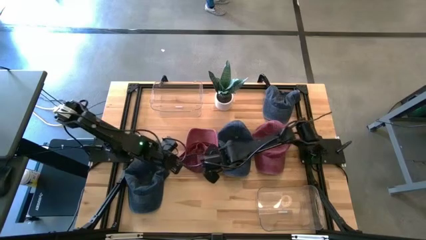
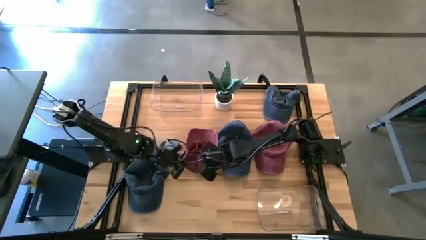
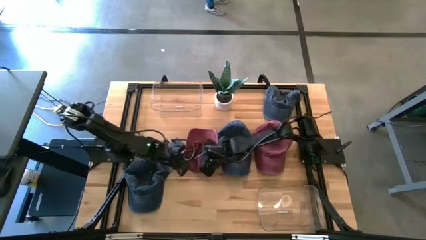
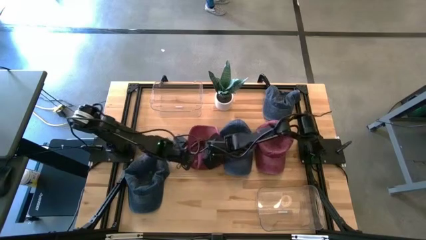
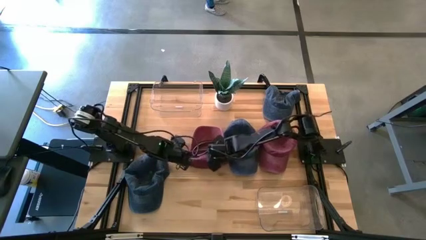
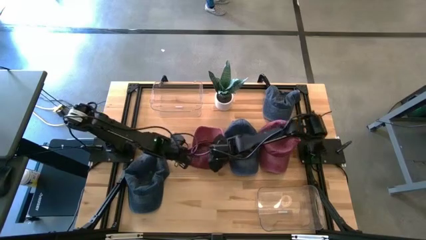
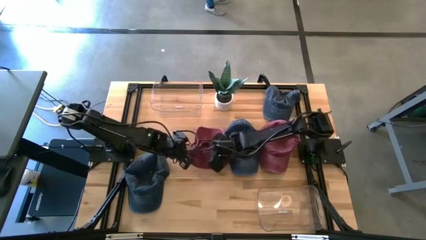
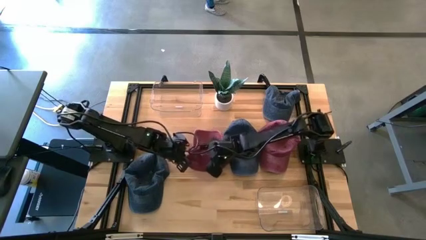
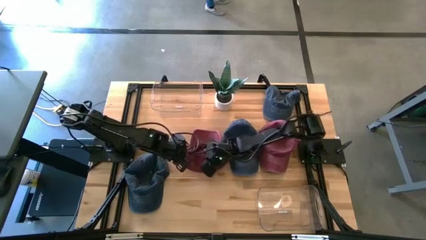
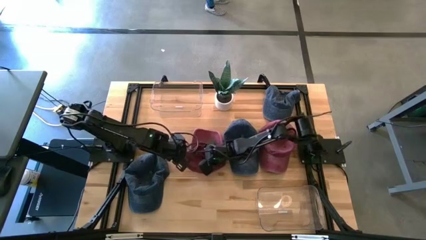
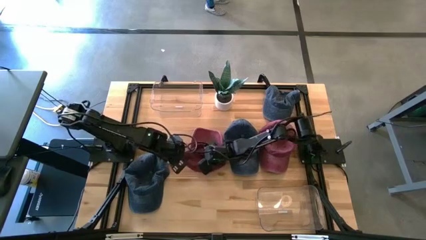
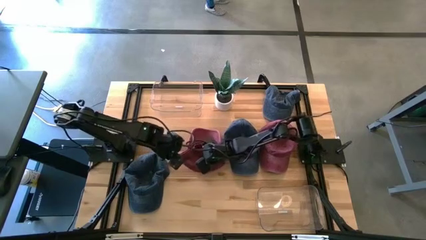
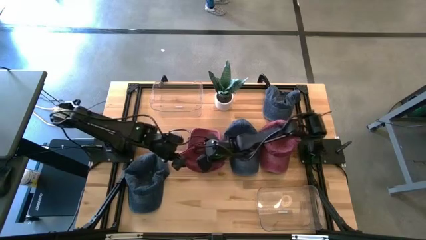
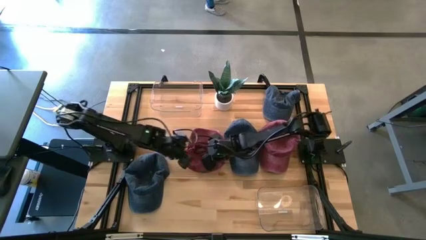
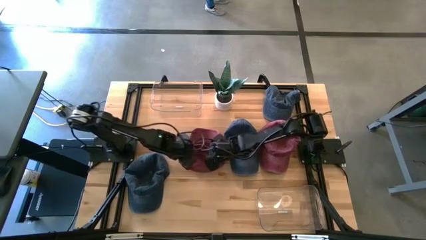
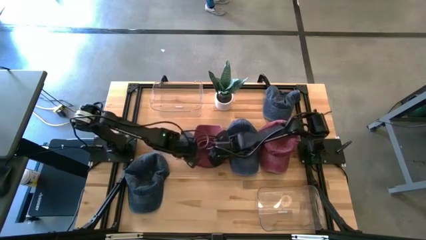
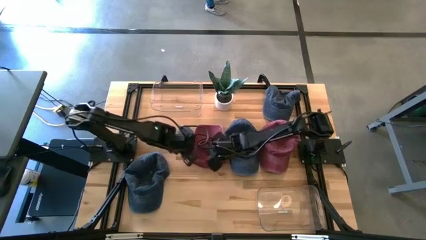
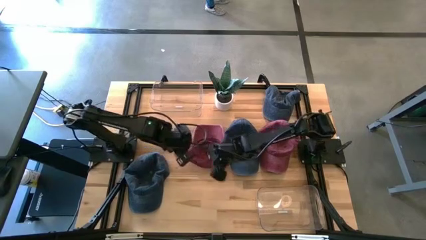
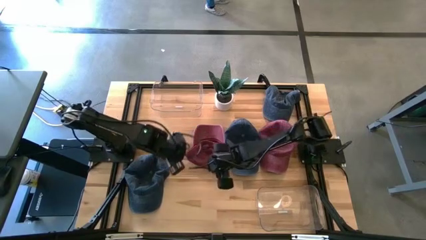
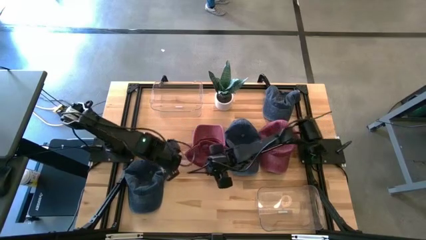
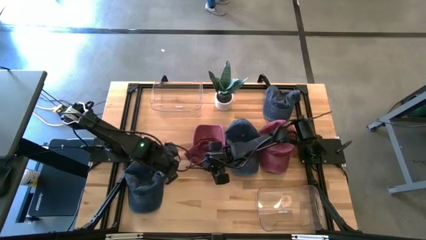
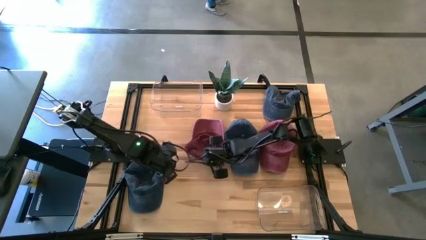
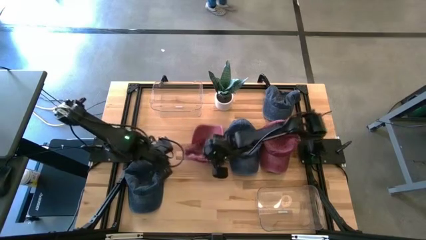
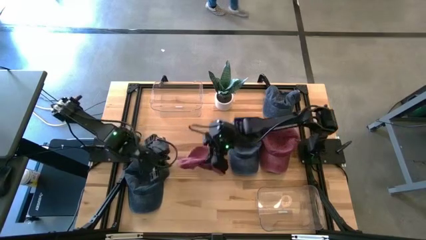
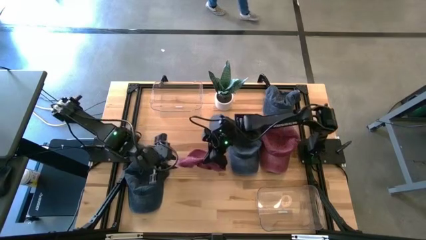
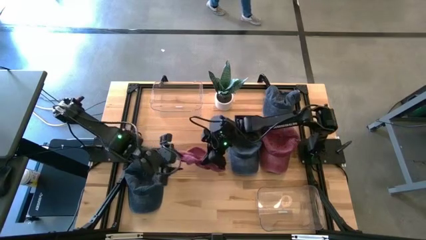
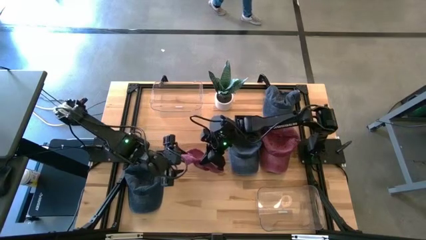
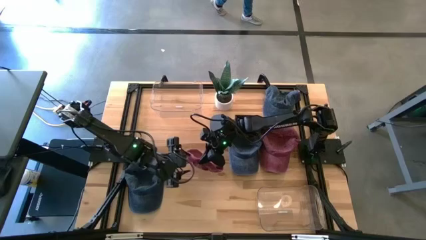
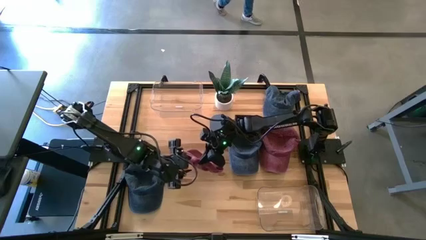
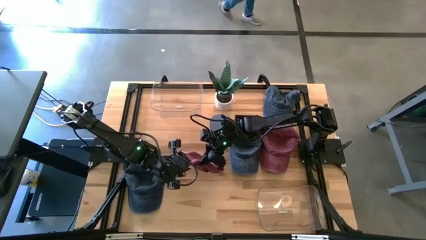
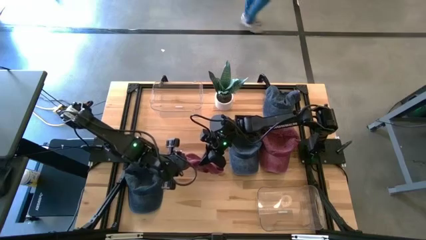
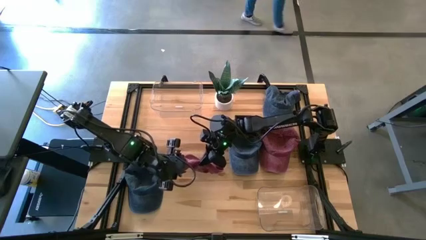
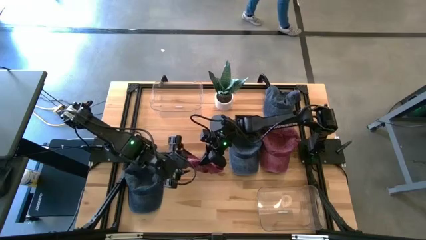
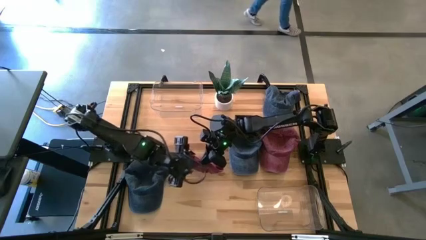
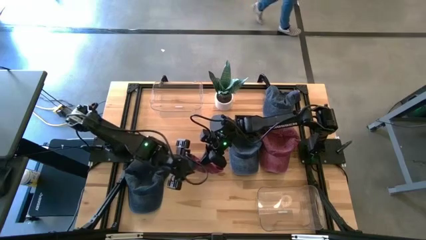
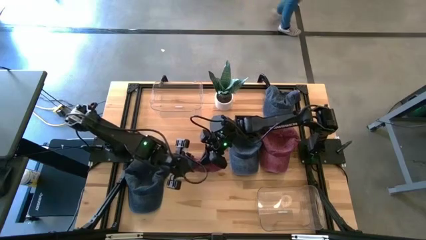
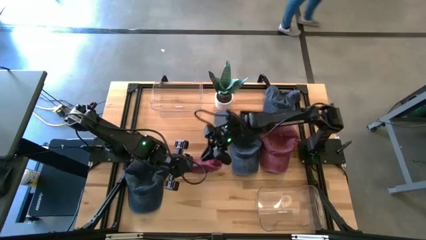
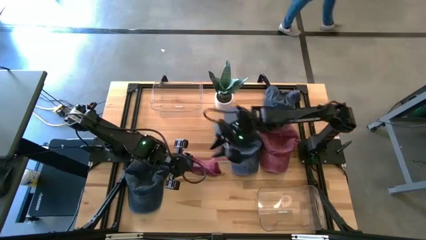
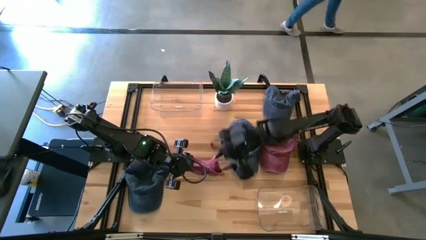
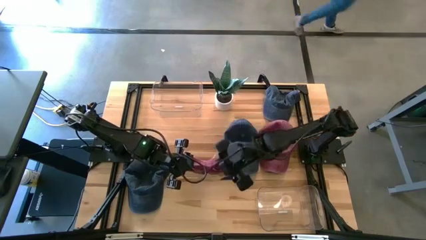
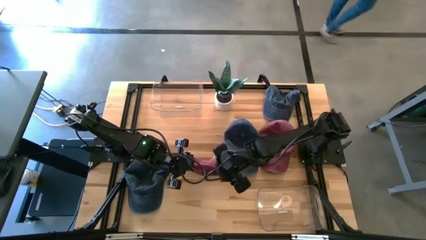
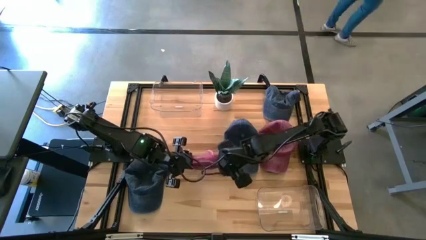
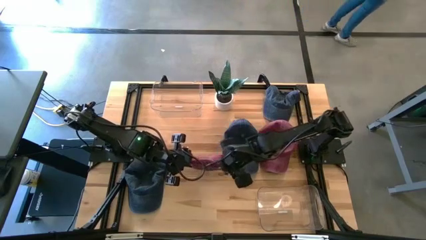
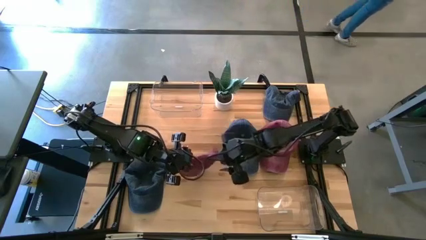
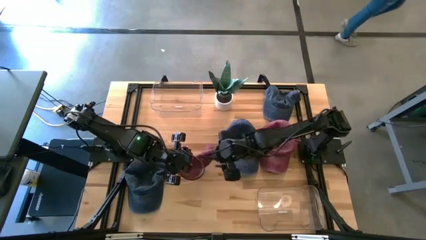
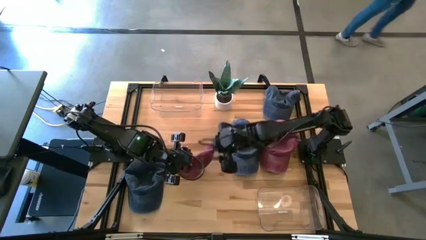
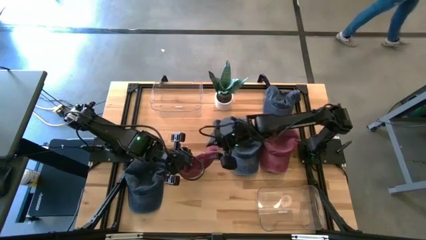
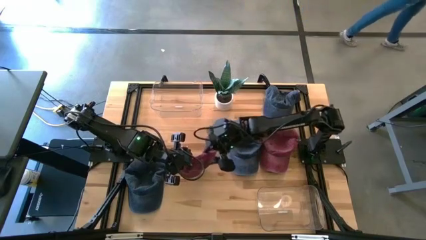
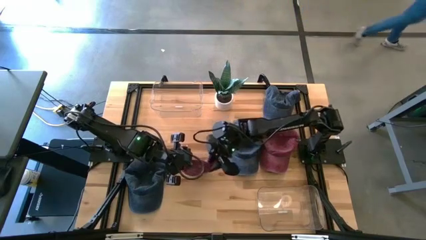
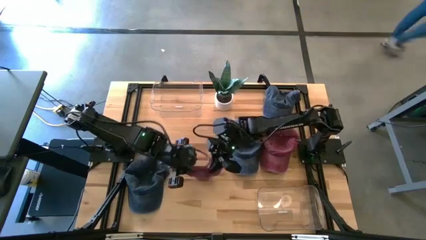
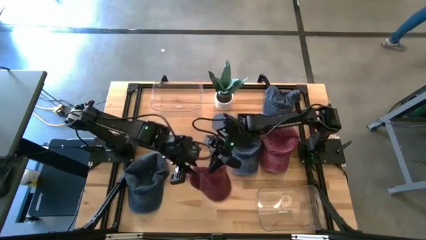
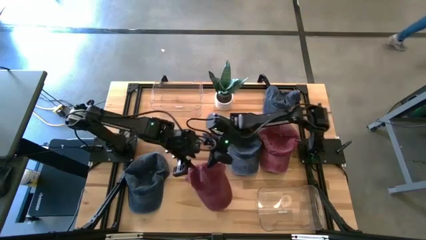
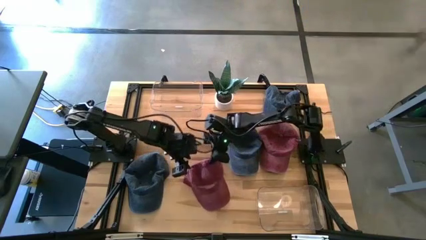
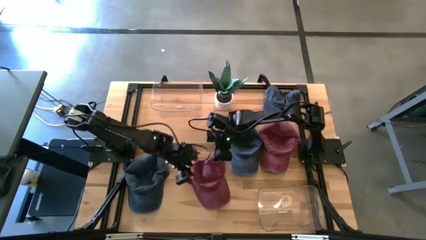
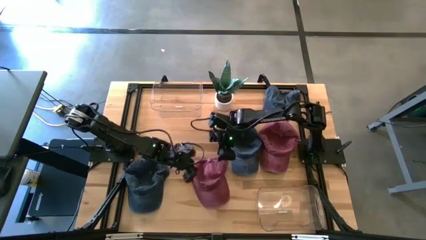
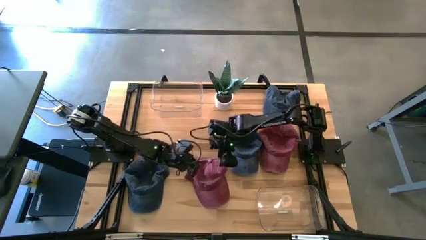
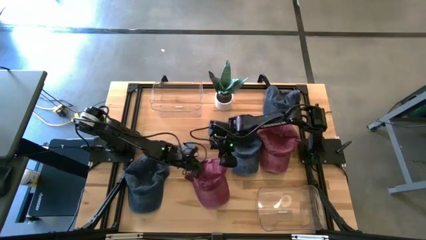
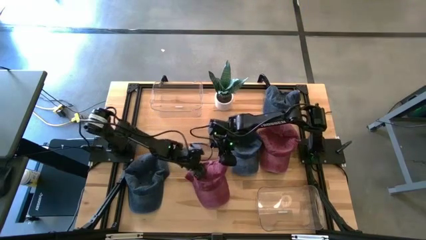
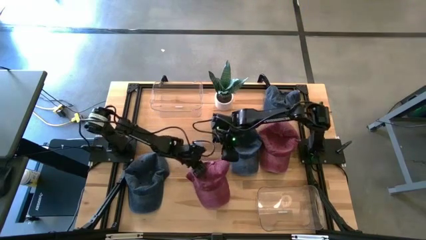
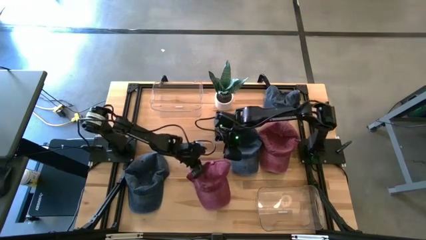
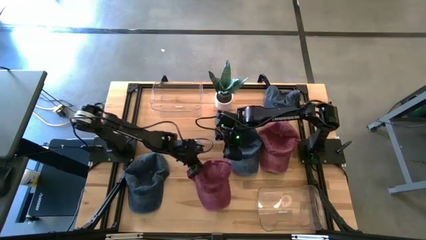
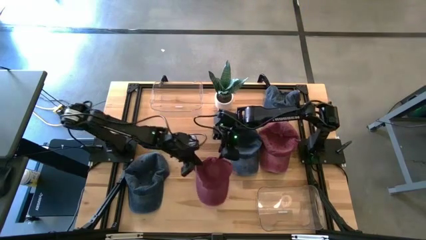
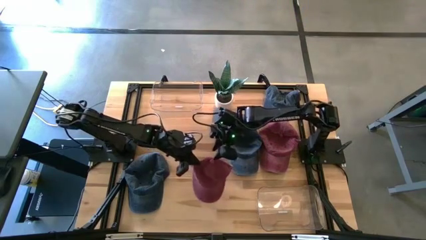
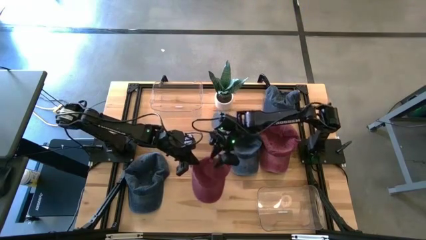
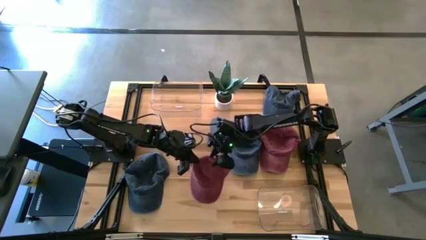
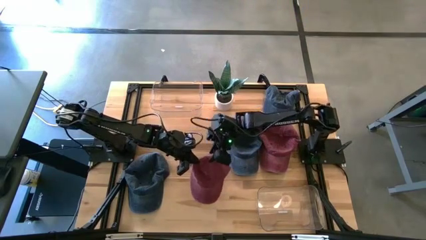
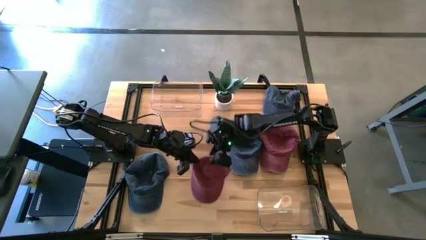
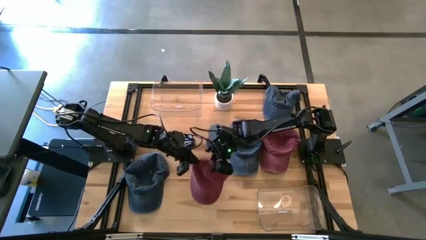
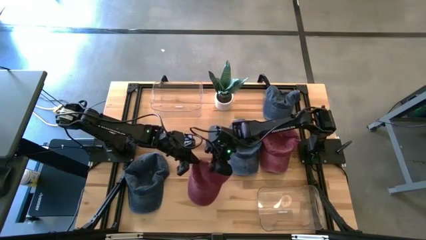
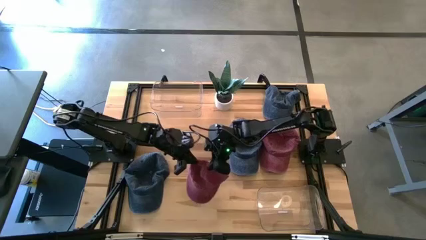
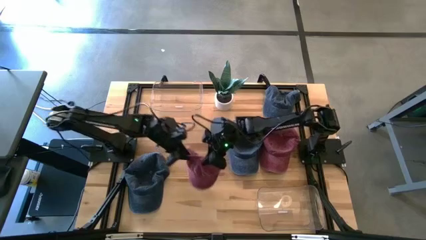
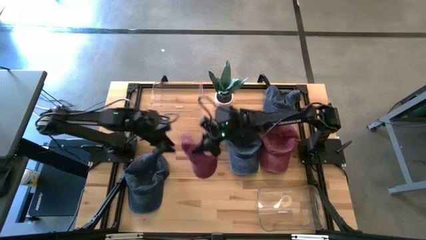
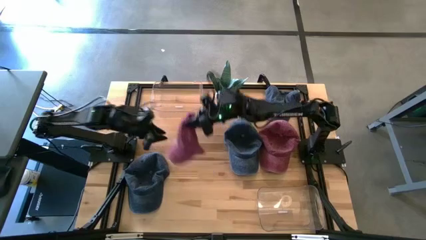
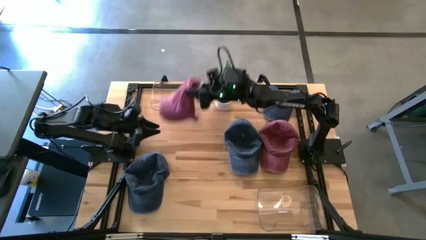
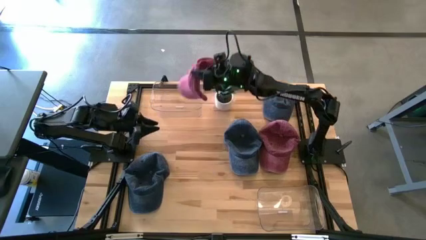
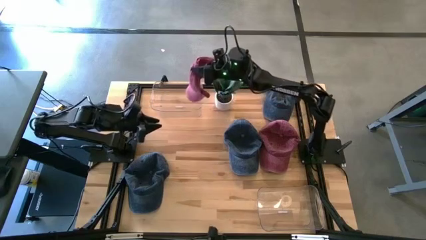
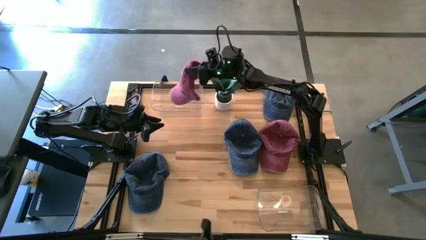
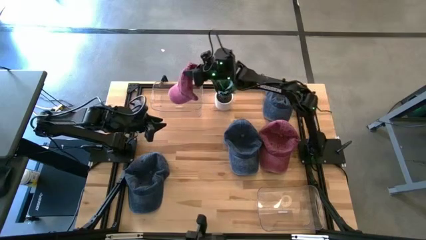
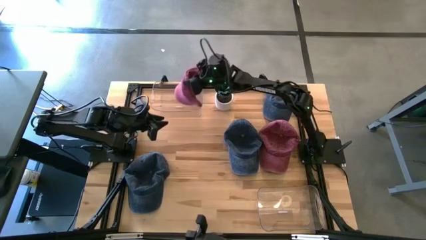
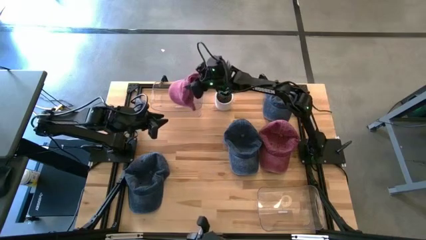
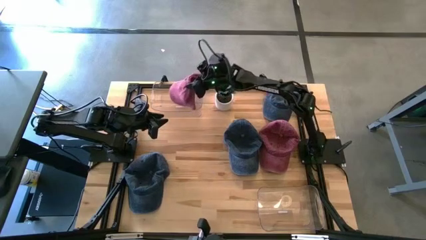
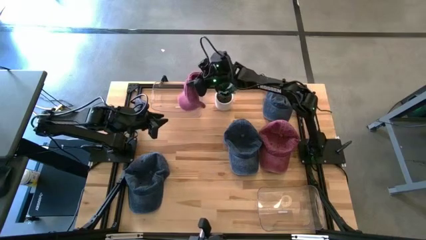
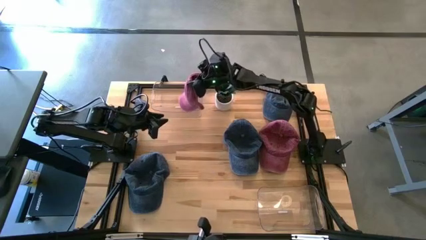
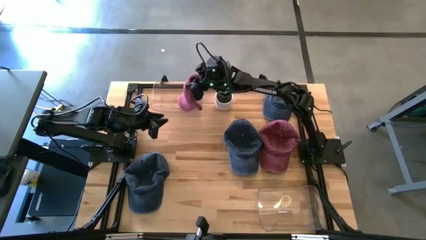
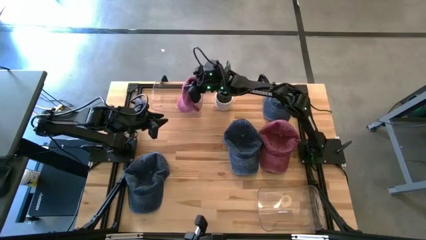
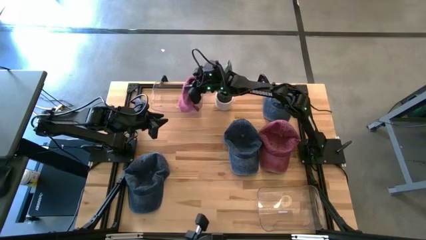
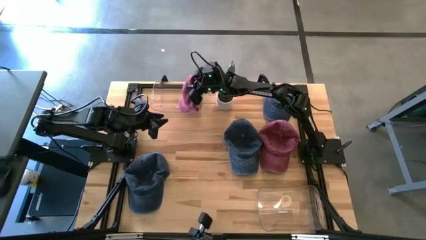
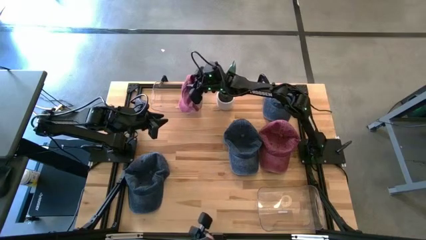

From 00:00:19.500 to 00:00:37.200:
Task: Pick & Place hat
Put the left red cap into the top transparent bin
